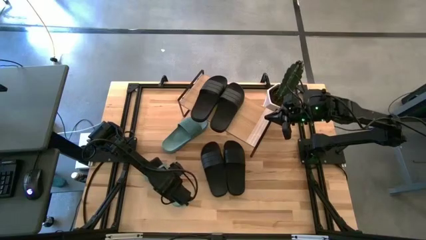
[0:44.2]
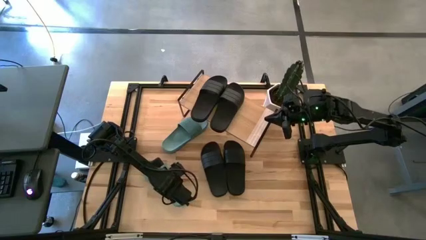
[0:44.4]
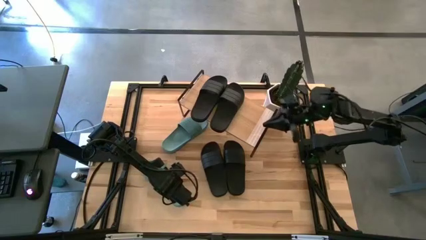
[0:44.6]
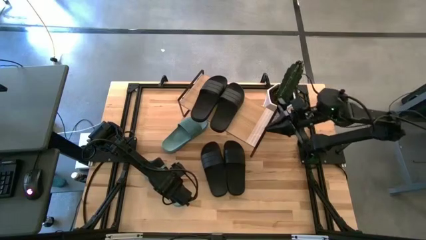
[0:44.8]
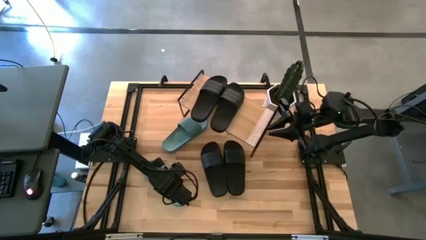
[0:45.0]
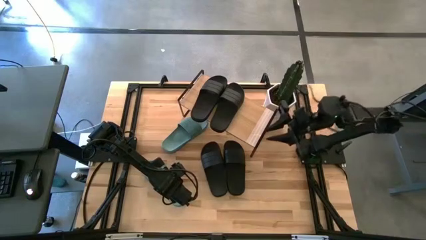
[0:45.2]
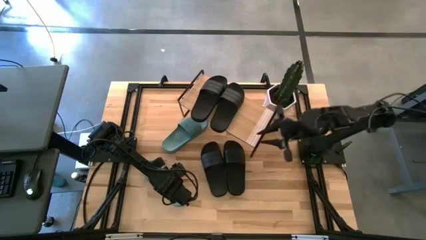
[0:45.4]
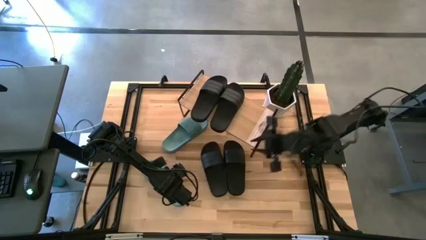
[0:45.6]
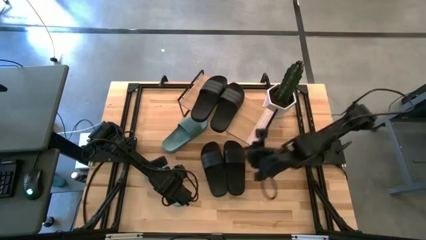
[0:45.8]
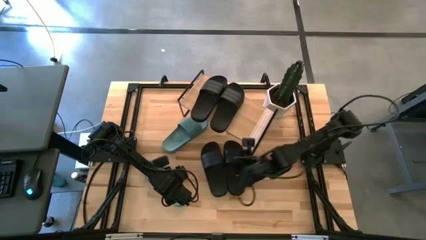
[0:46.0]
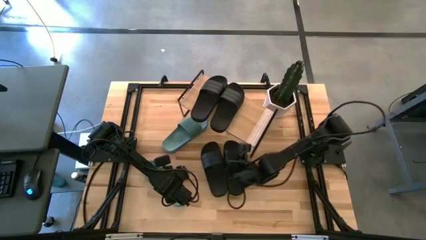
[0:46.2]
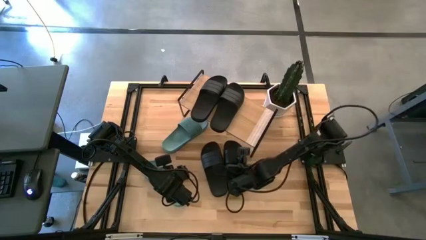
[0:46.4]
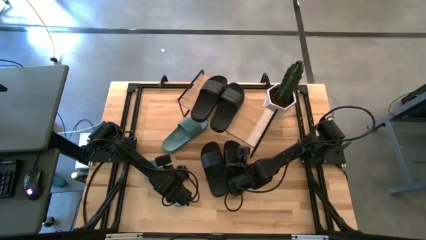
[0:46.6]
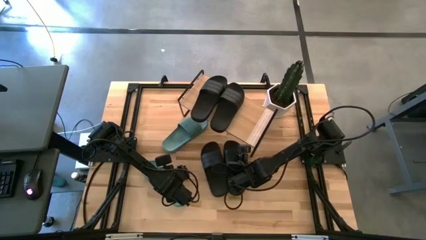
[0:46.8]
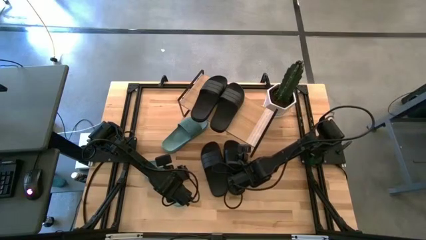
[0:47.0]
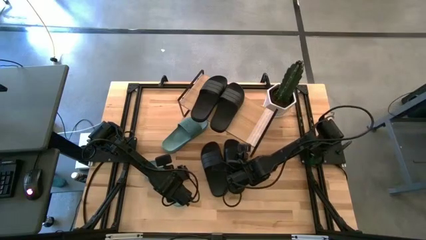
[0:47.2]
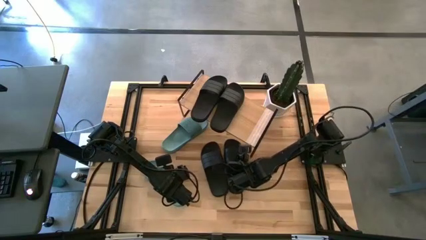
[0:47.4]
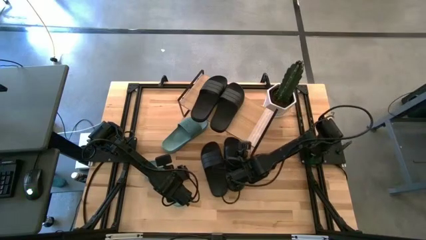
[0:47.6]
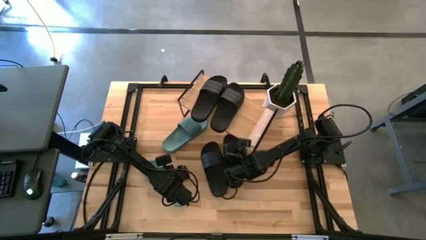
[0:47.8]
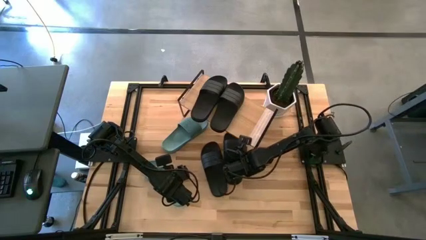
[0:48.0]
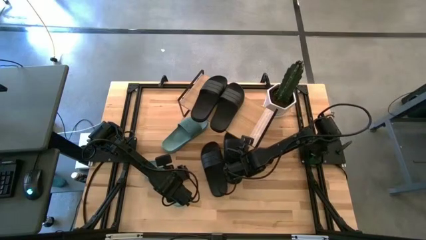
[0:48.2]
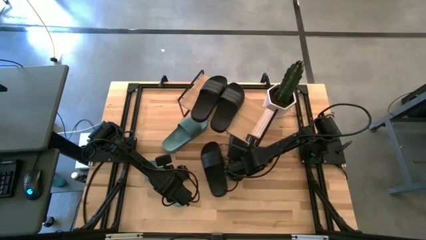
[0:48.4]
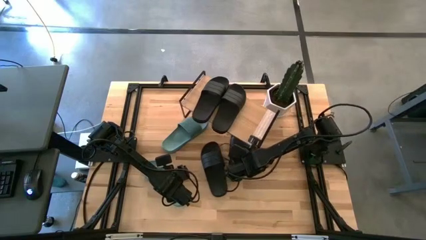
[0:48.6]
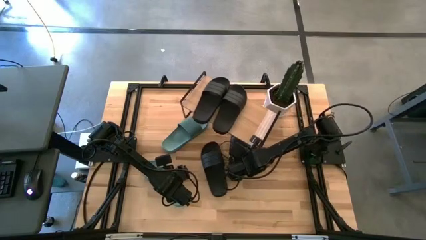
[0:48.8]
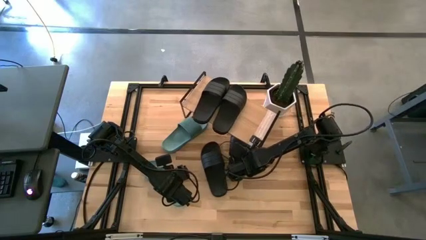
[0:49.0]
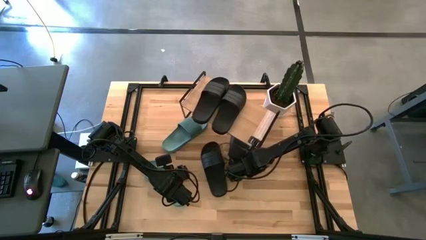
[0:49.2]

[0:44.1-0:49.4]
Task: Pick and place slides into the shelf
Move the black slide under the shelf

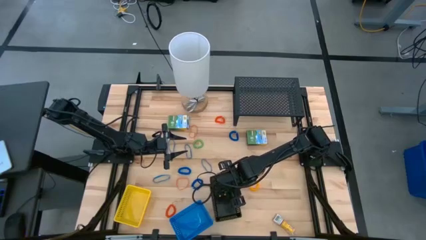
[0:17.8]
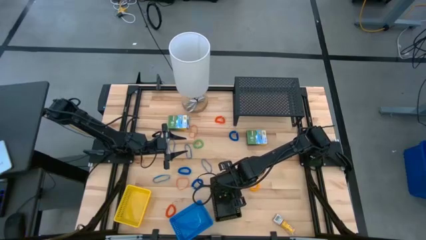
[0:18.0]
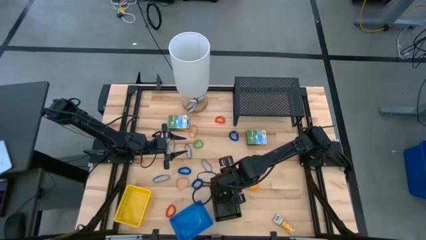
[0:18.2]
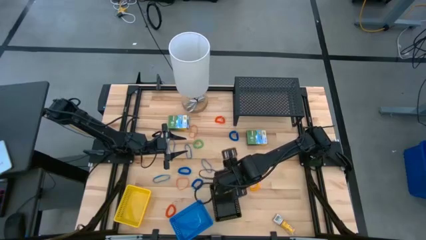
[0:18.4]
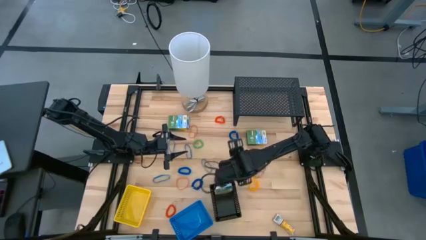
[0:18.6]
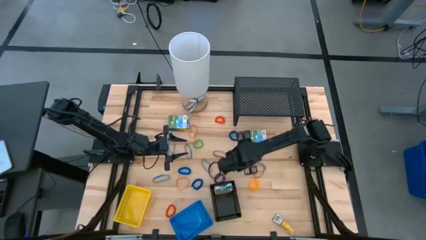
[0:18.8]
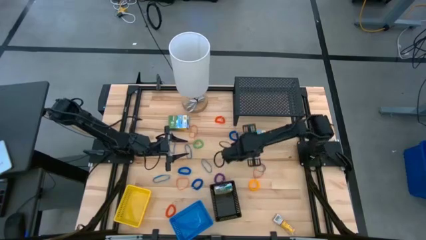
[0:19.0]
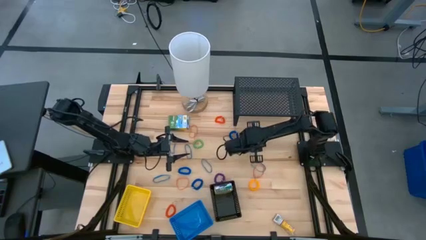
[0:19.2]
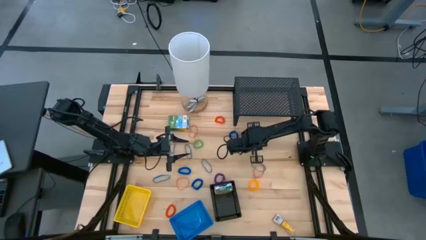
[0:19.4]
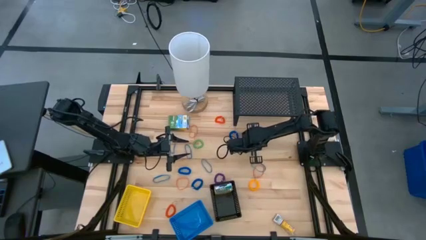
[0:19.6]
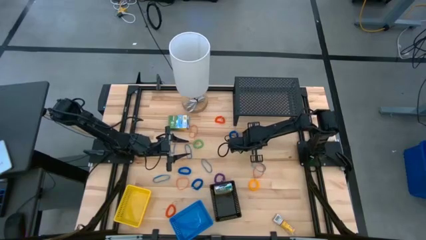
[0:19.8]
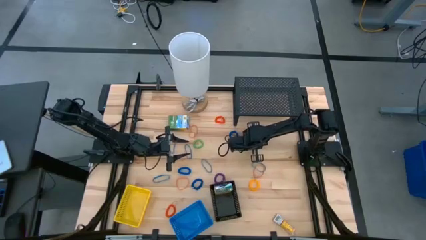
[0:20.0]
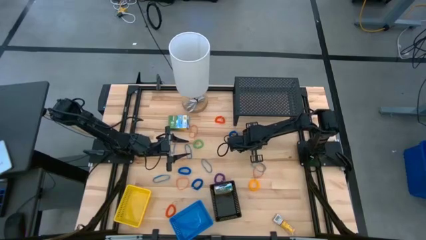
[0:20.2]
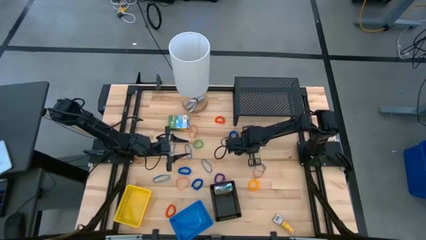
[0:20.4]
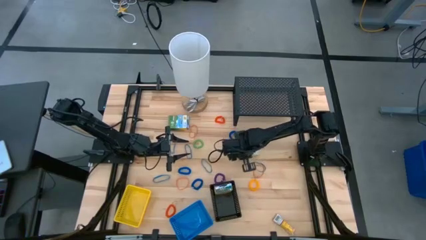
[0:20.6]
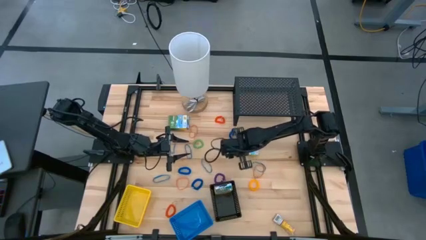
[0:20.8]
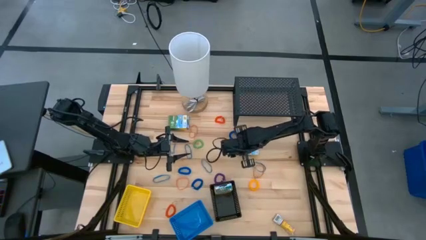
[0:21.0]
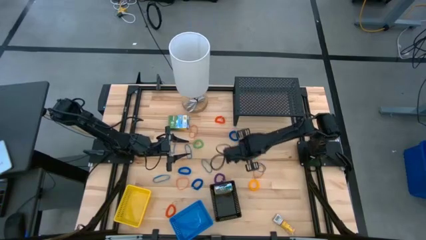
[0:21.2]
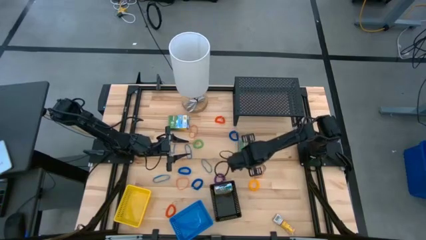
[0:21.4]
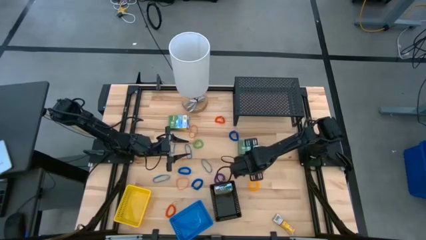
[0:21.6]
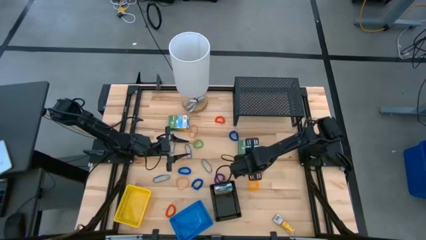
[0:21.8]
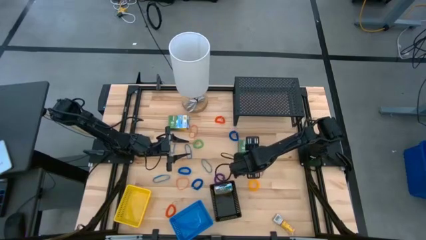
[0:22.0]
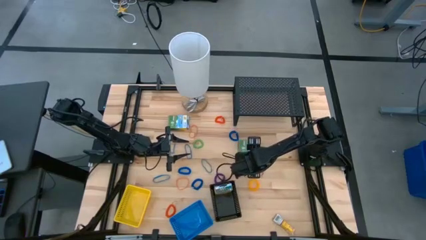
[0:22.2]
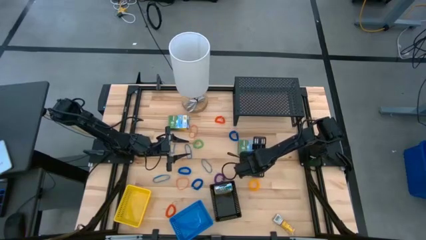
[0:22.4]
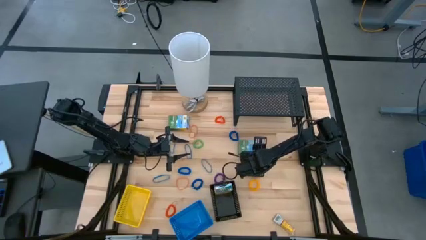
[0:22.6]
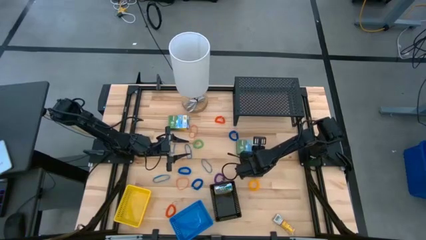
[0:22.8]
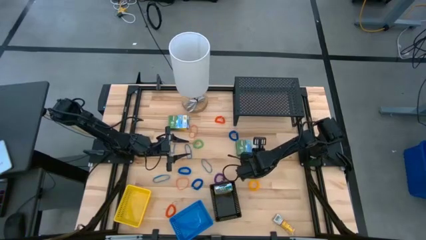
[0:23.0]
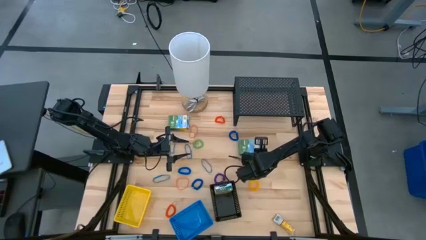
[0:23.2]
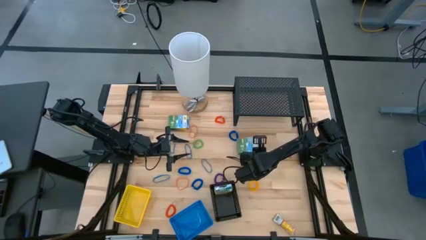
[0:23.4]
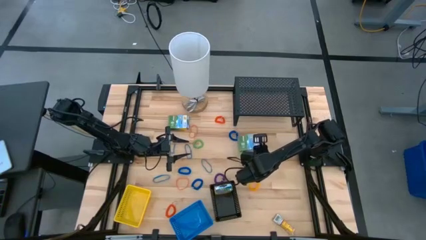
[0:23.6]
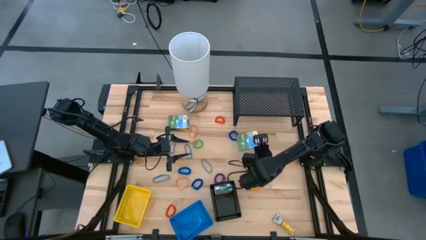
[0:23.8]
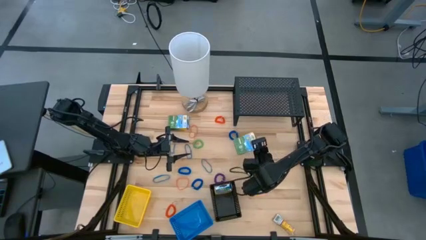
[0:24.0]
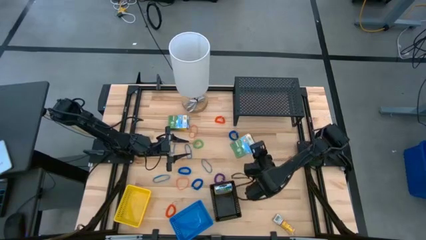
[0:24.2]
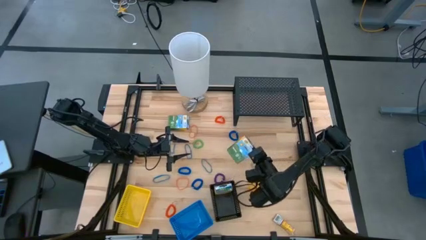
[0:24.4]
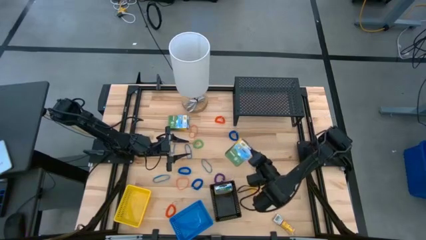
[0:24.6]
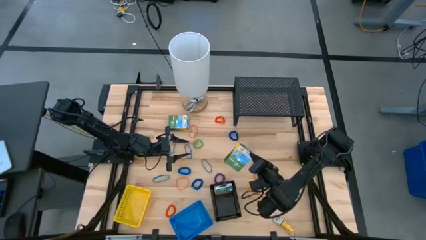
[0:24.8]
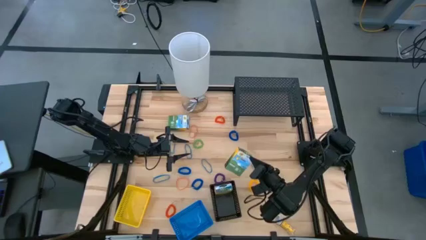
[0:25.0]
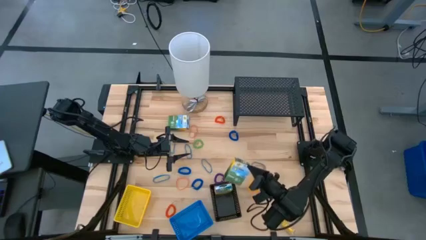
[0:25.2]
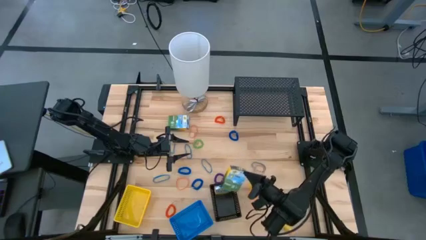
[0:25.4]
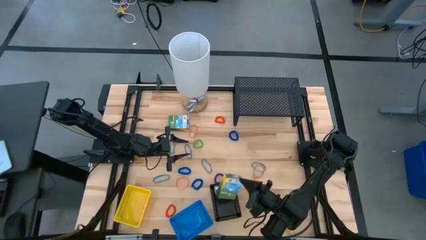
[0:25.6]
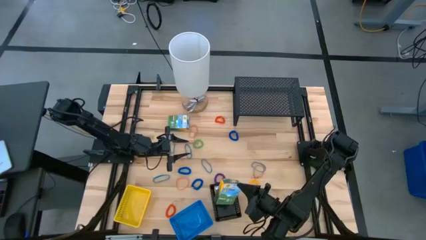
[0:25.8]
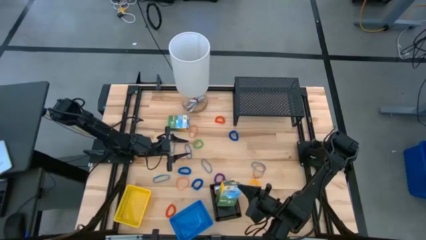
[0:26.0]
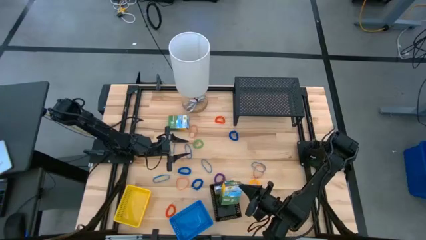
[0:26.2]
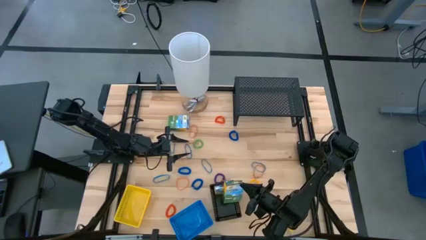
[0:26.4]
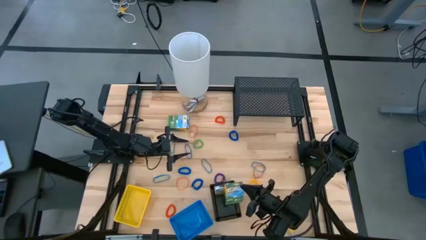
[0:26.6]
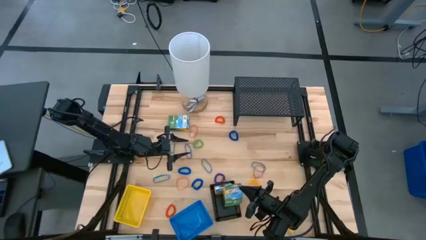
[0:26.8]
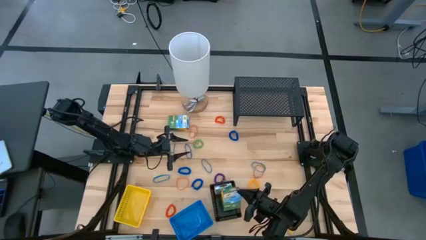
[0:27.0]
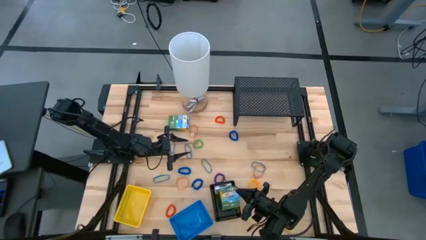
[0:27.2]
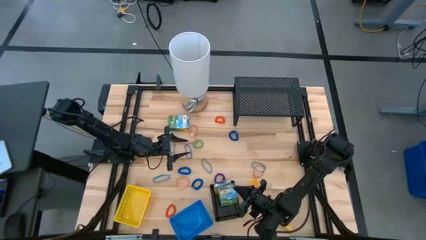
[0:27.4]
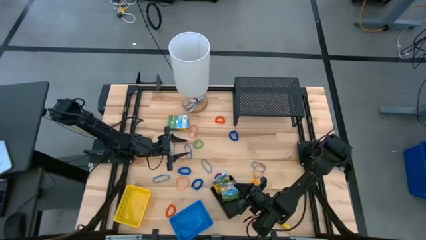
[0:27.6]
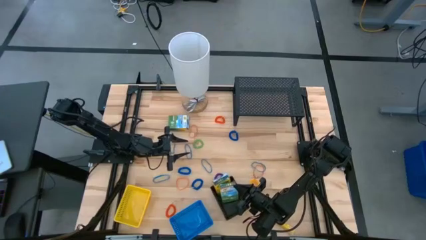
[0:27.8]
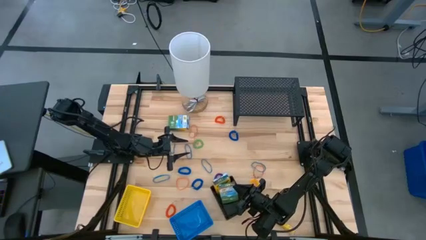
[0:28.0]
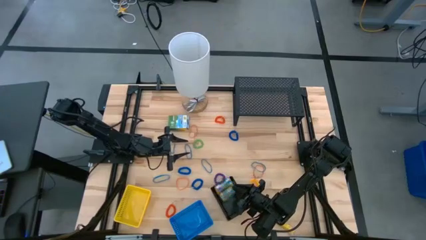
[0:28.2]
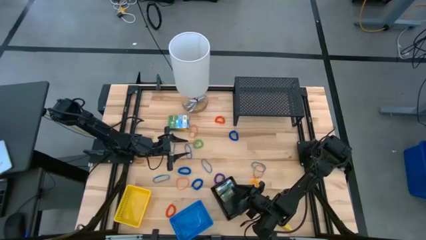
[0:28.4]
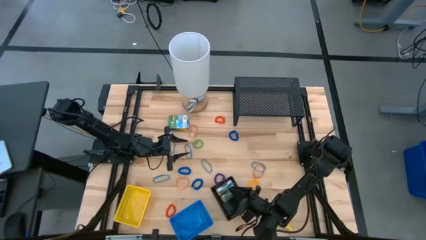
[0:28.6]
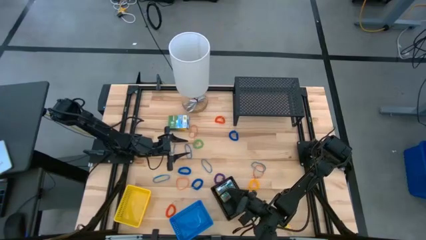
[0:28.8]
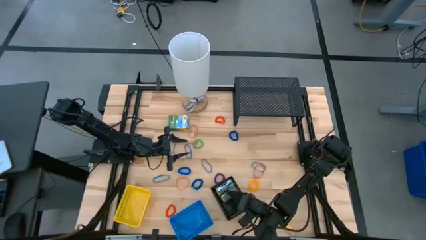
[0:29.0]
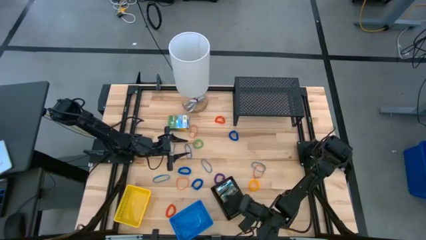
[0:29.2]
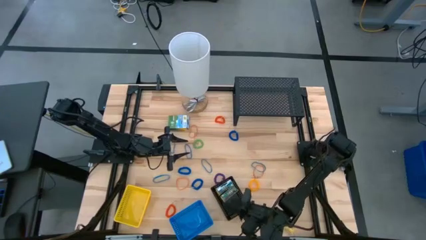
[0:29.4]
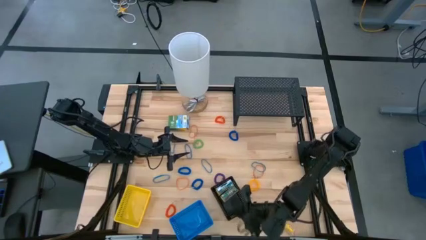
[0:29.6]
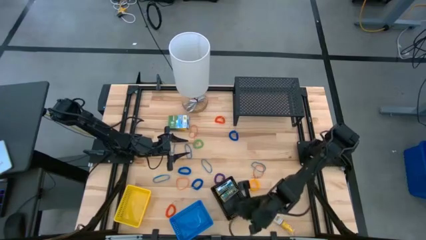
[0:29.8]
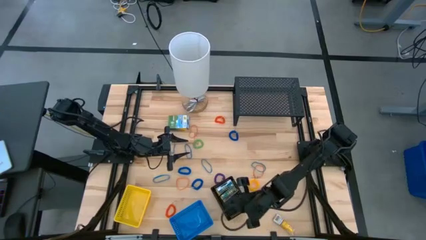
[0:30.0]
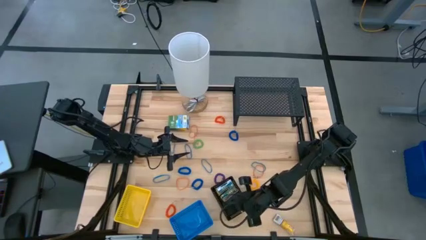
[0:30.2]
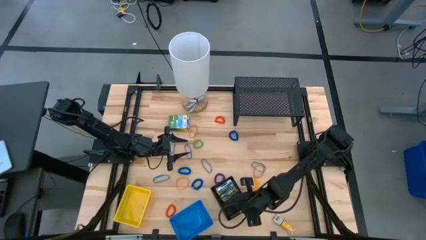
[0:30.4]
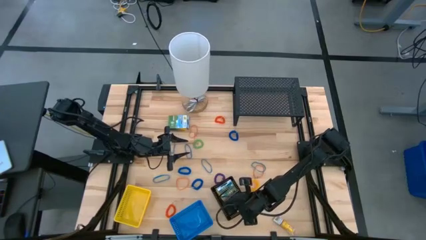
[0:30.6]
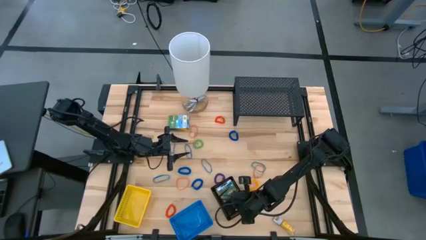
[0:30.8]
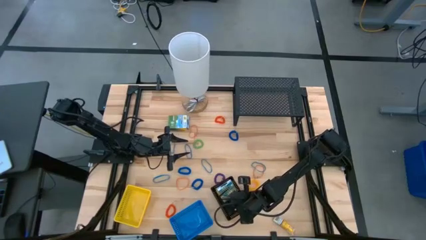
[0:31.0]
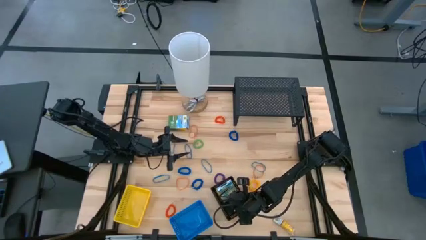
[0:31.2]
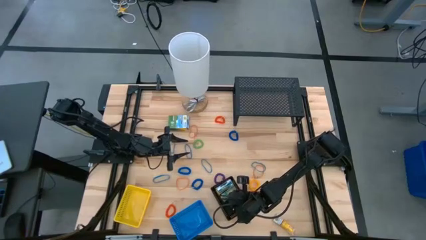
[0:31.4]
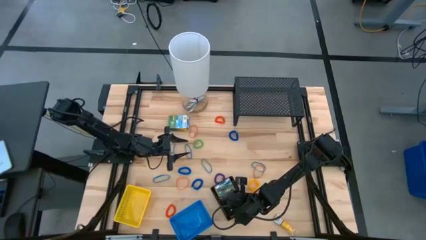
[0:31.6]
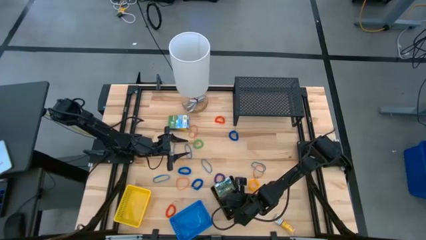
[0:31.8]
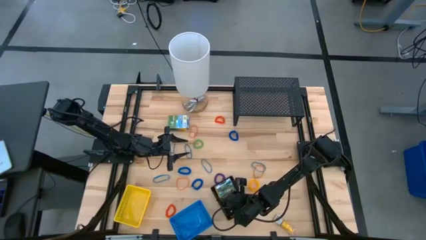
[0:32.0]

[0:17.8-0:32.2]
Task: Pick & Place Office Desk Supplies
Put the yellow crayon box into the black bin
